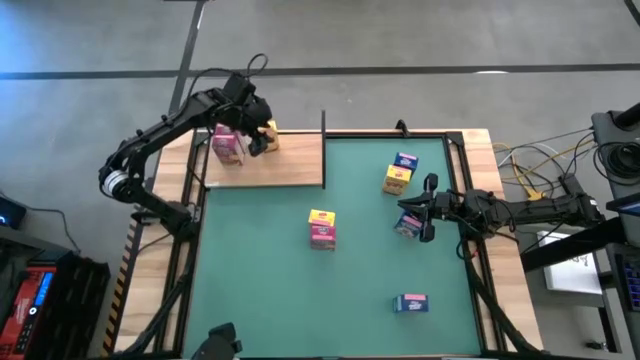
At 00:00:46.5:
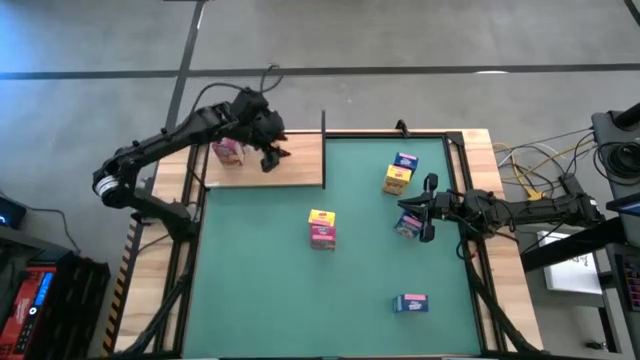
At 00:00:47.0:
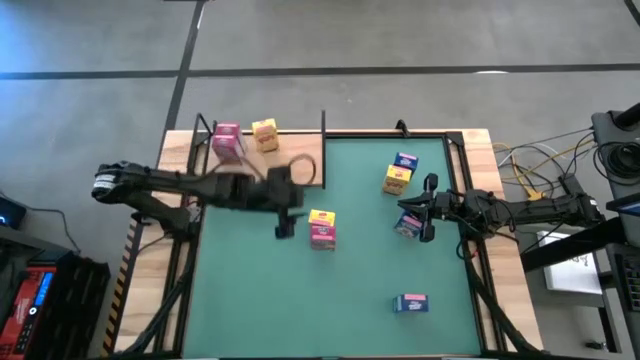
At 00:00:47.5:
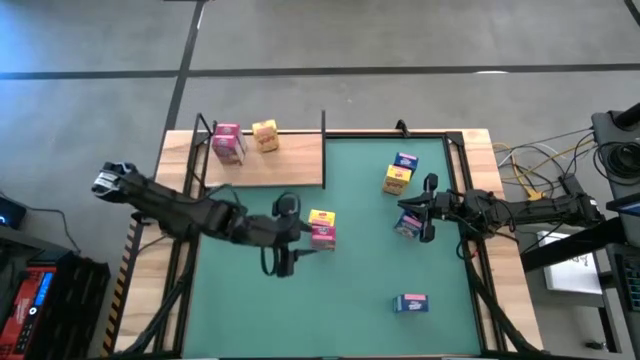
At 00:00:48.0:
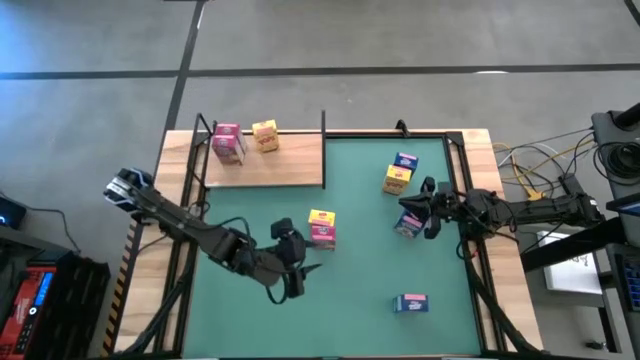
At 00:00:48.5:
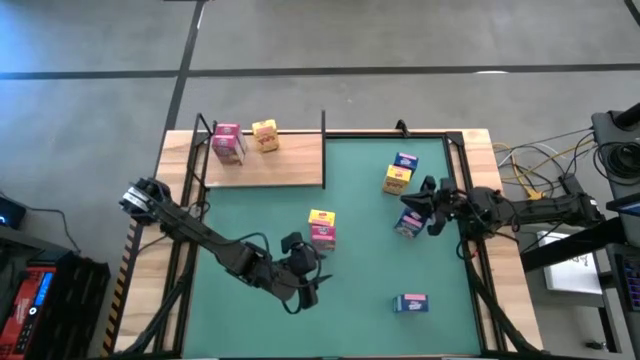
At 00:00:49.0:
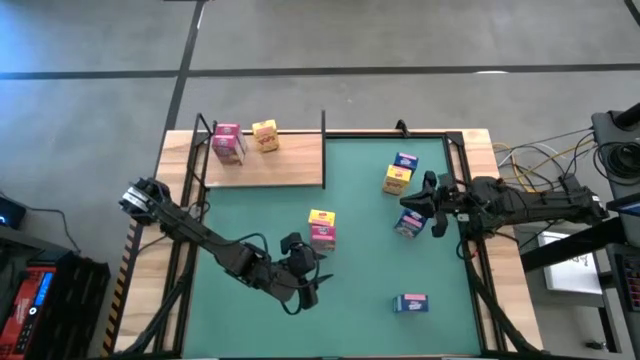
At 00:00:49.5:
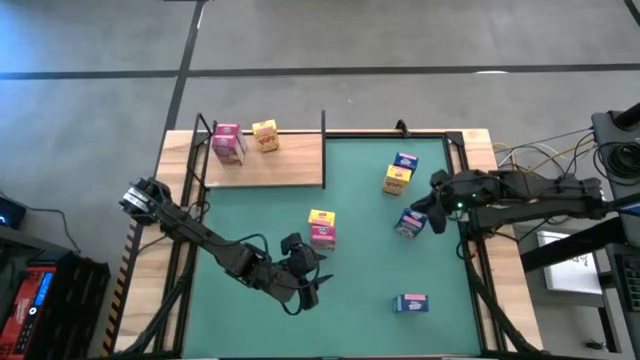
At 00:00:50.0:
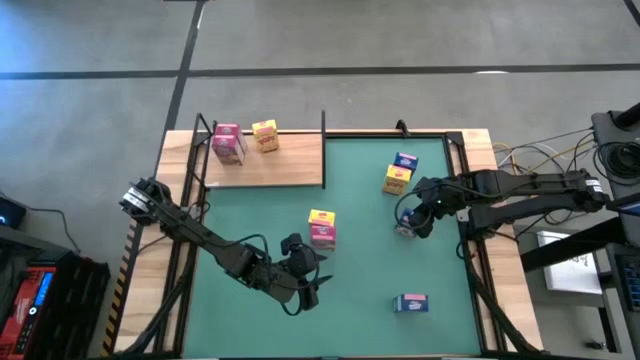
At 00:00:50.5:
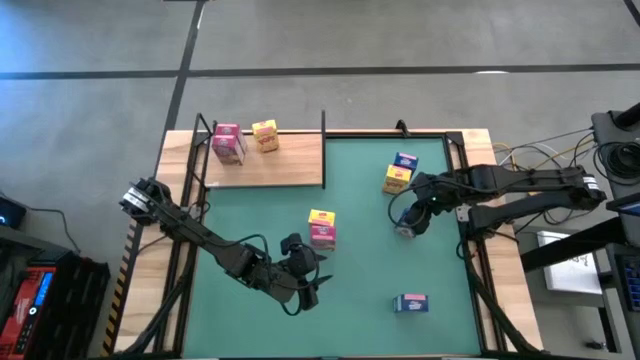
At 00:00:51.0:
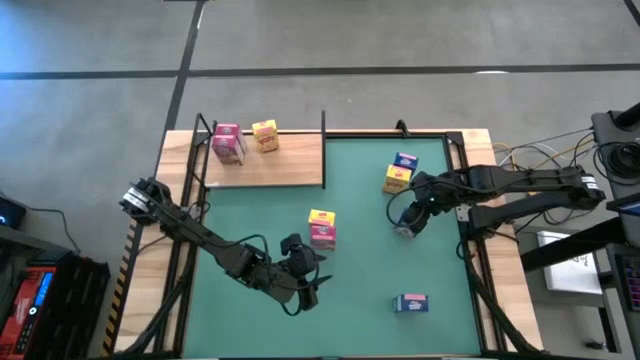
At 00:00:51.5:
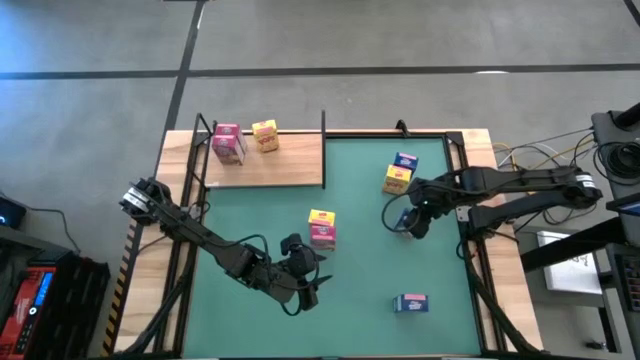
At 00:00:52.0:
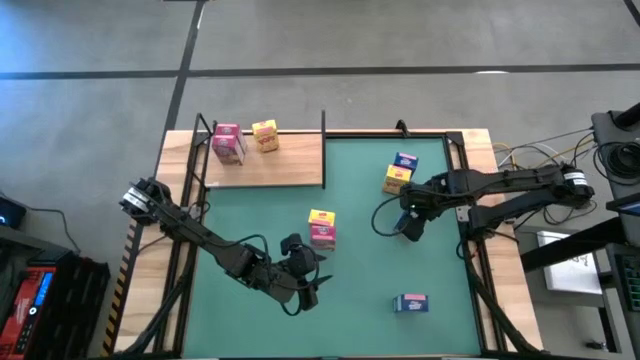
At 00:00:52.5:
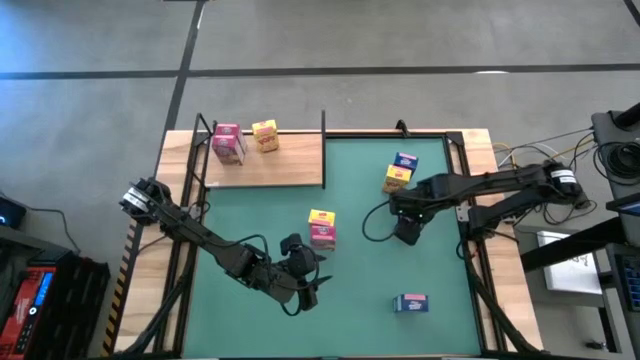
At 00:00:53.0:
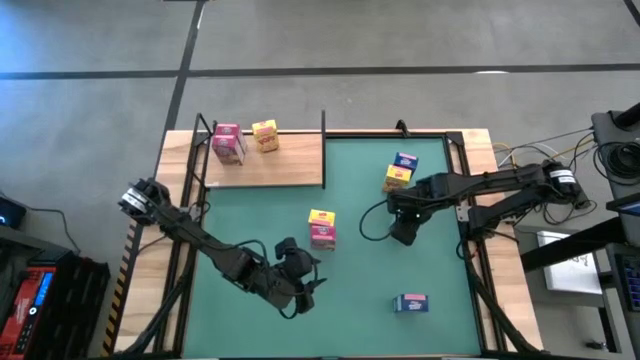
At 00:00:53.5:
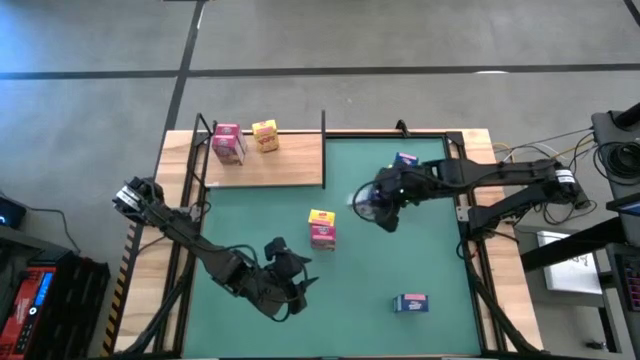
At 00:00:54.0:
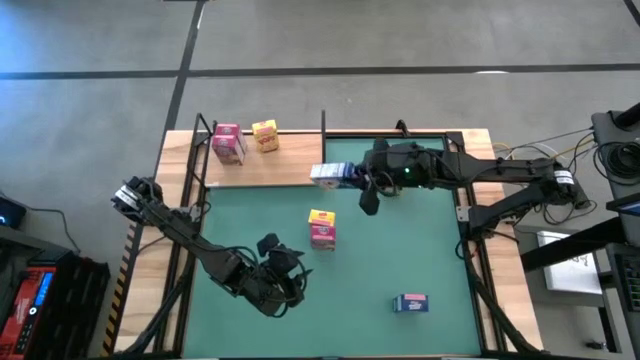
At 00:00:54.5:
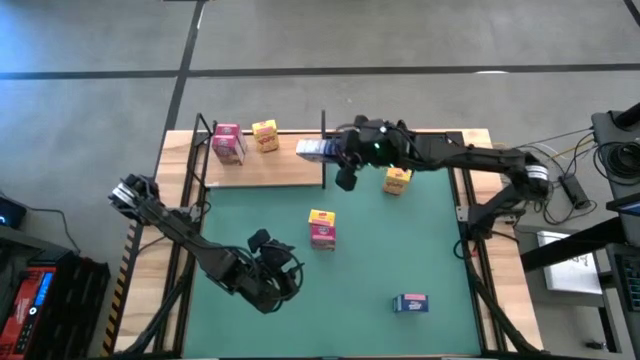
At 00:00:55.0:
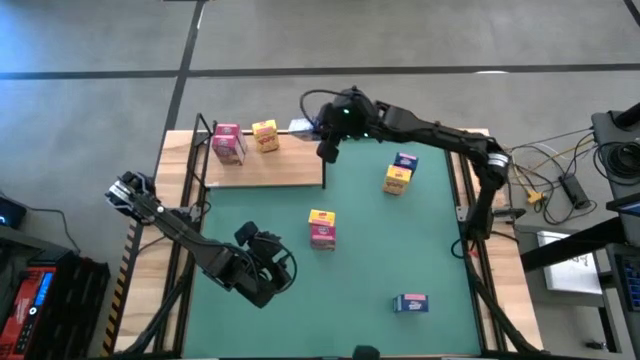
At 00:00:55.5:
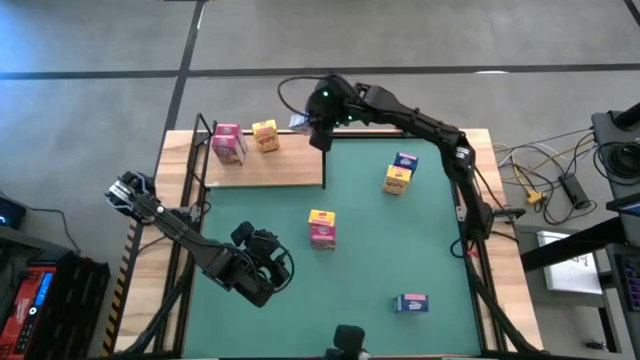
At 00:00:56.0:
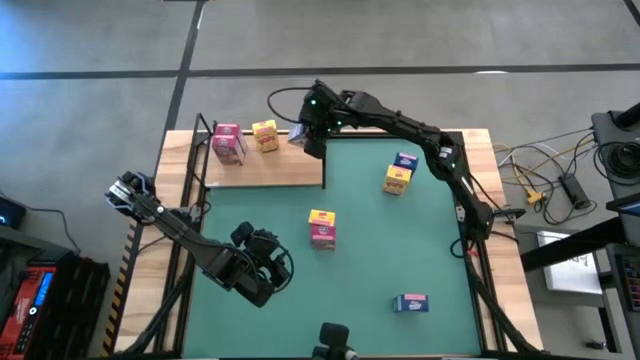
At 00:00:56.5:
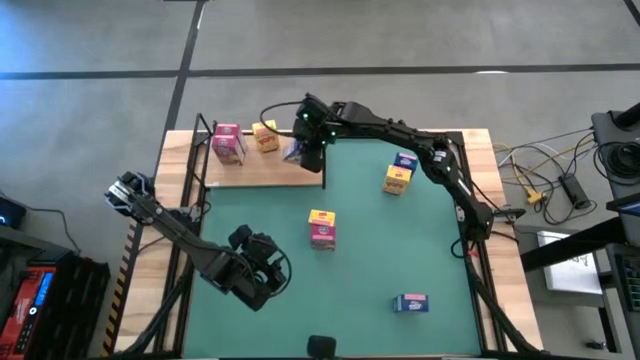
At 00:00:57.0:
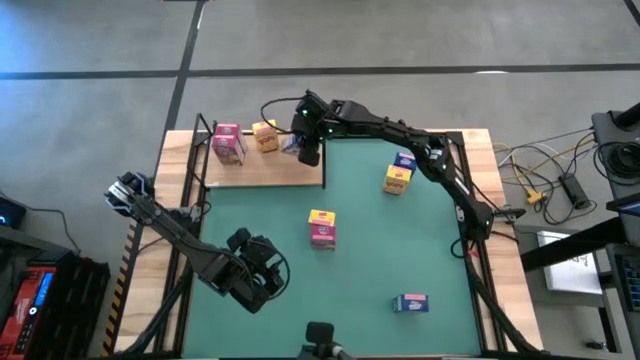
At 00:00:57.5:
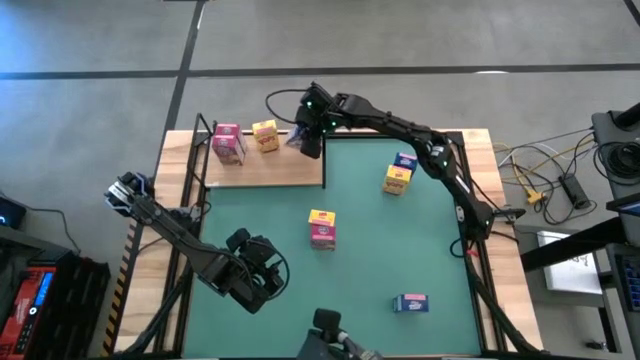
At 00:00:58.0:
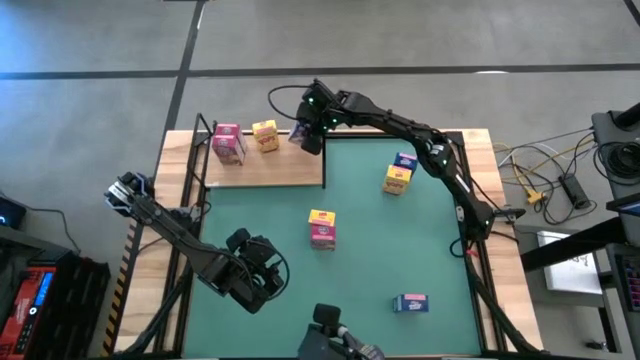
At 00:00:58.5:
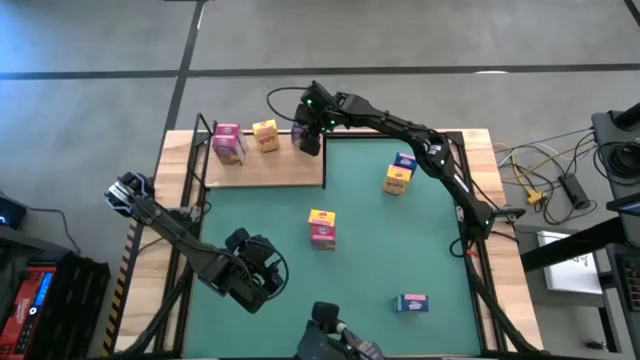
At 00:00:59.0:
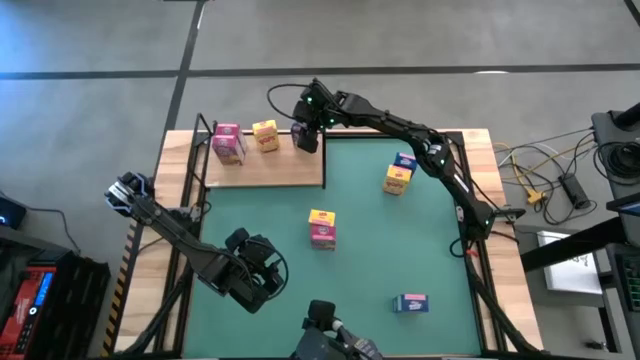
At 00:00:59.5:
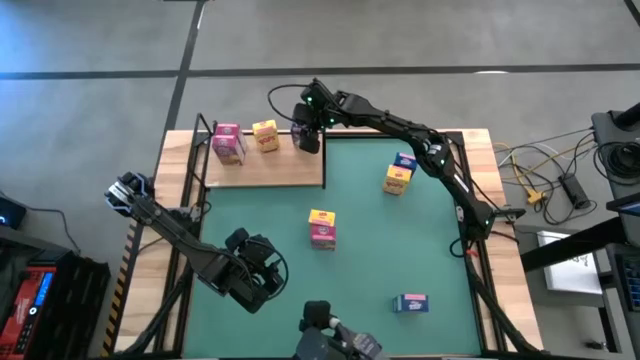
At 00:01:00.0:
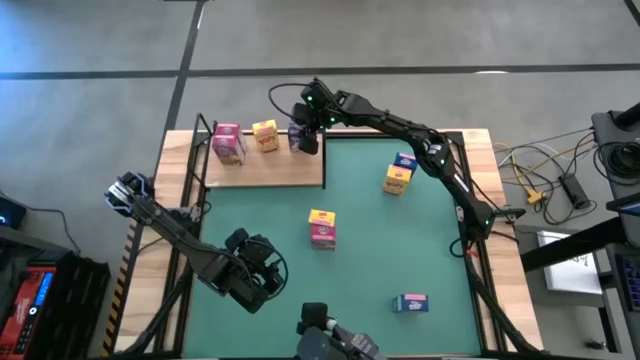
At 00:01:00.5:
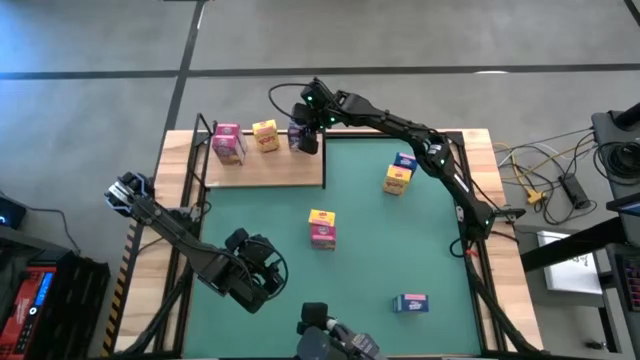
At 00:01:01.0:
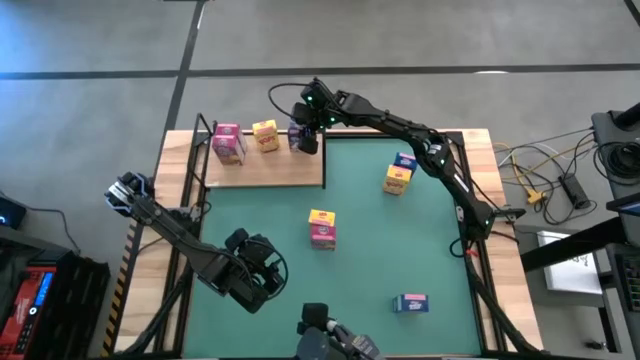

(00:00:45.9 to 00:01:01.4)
Task: Stack cereal on shelf
Put the middle blue cereal box on the shelf

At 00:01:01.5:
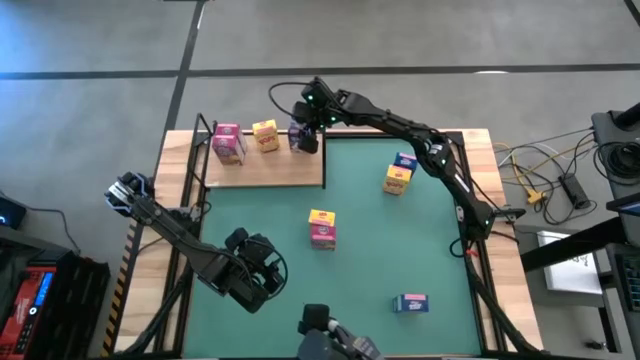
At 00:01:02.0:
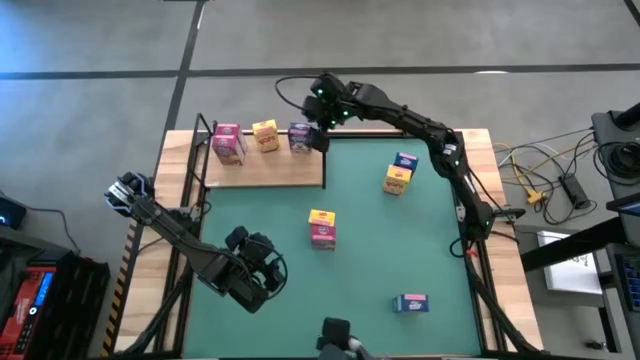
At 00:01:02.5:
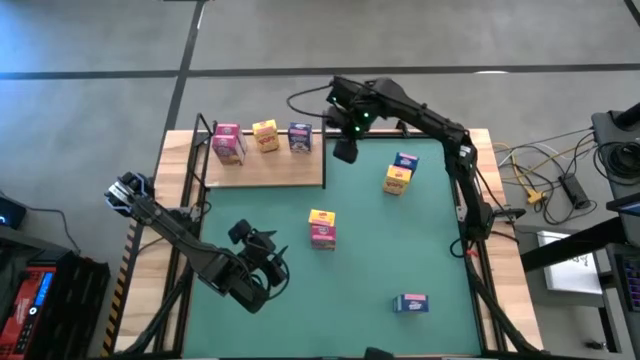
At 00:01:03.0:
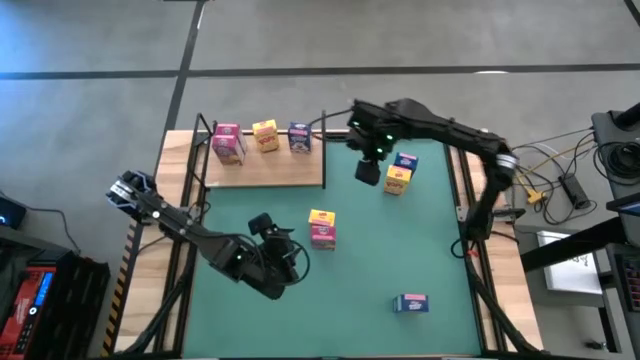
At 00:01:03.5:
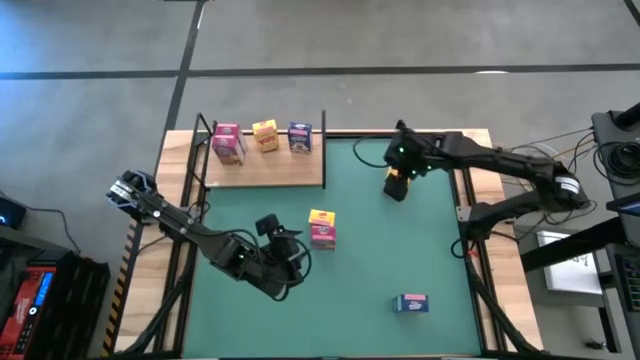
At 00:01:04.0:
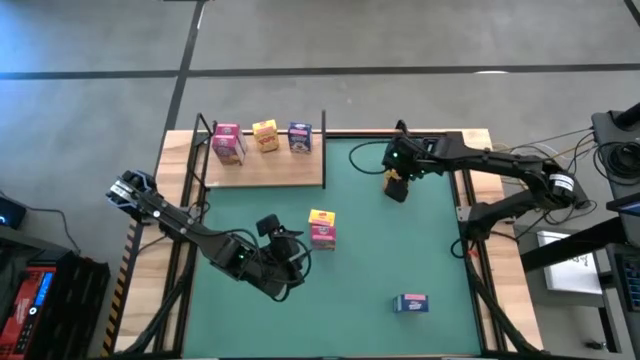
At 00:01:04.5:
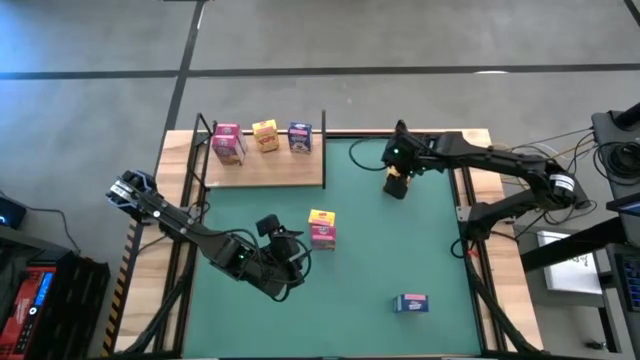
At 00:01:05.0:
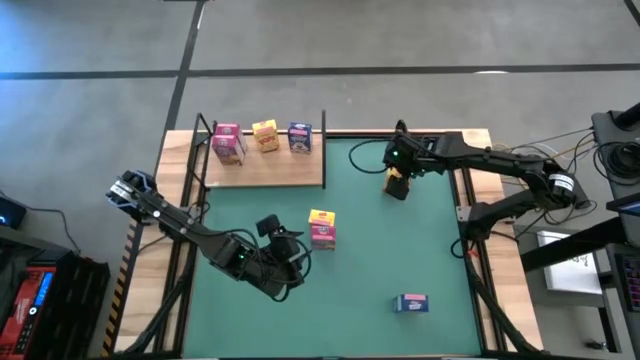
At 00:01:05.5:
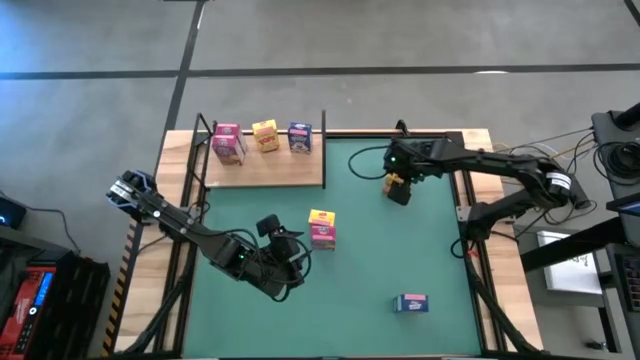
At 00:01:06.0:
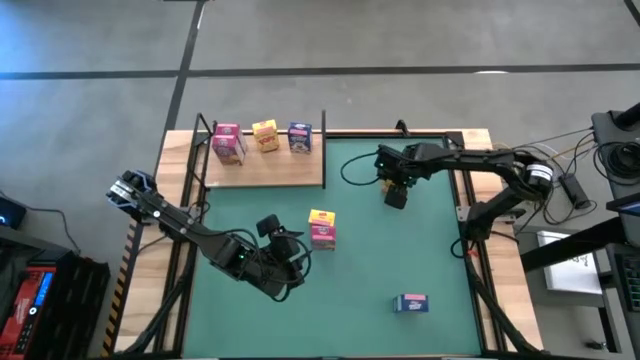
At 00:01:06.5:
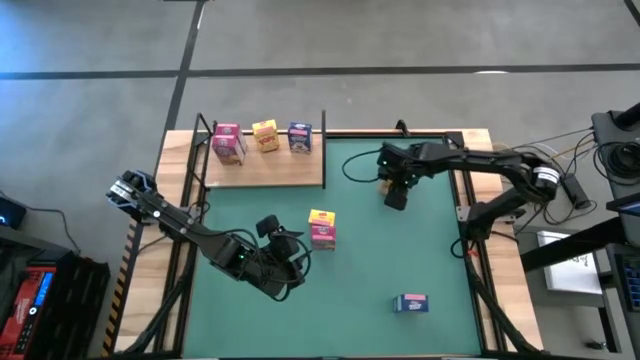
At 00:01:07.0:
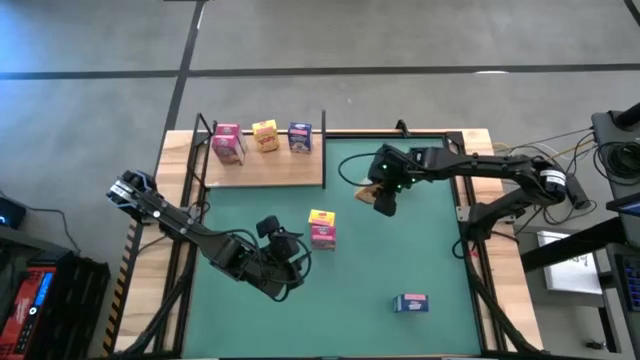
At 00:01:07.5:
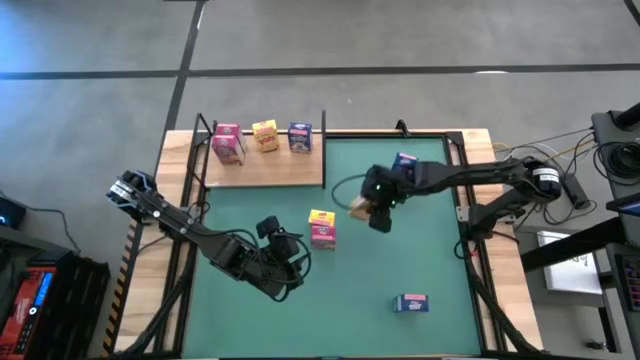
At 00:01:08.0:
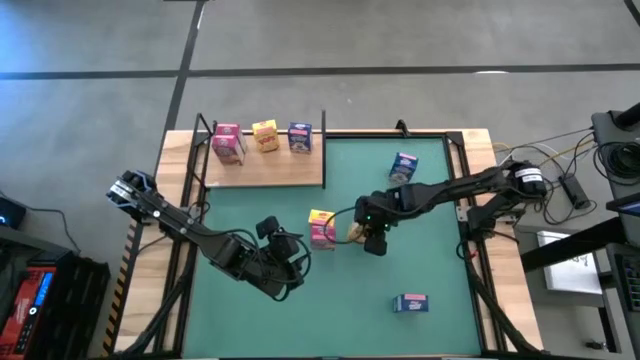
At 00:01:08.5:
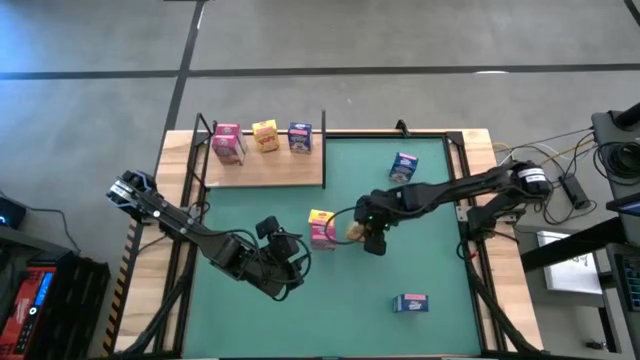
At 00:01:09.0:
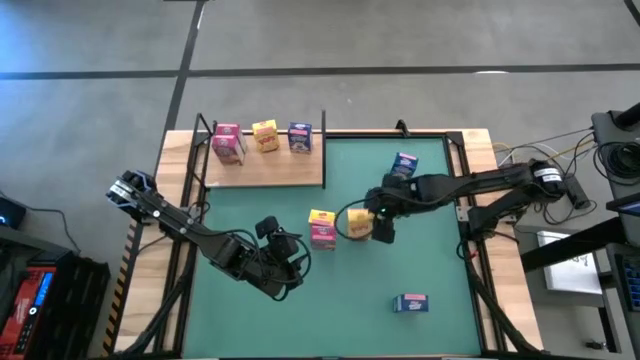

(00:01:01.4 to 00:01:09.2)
Move the top yellow cereal box to the center of the table
